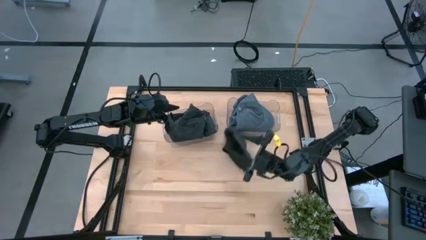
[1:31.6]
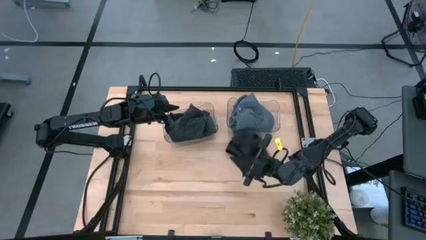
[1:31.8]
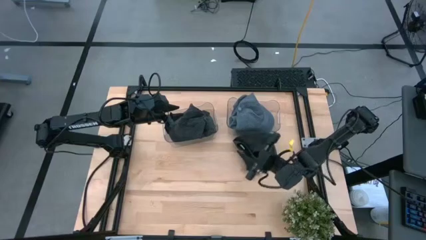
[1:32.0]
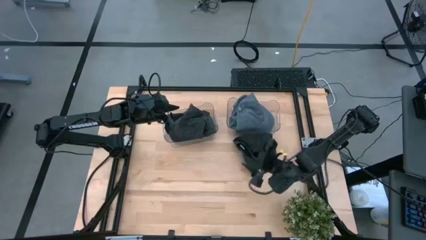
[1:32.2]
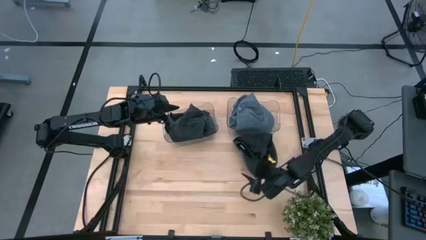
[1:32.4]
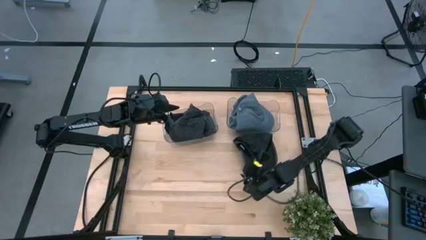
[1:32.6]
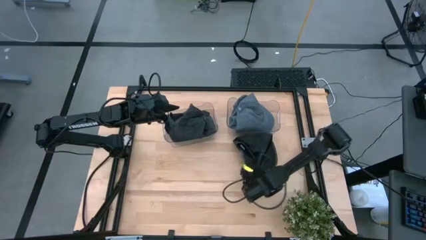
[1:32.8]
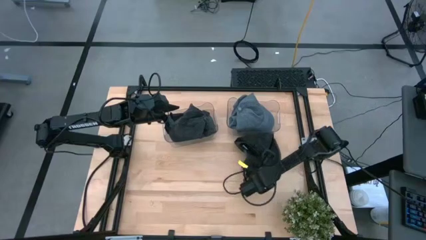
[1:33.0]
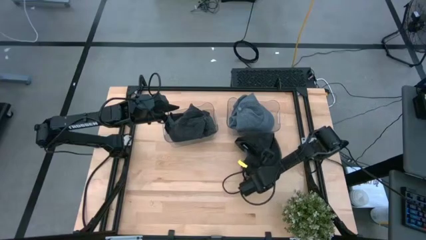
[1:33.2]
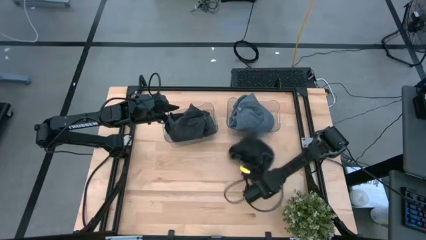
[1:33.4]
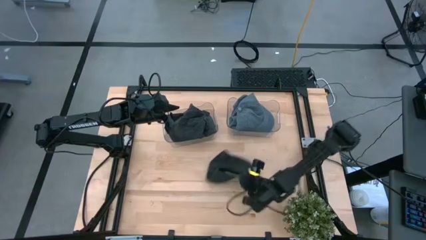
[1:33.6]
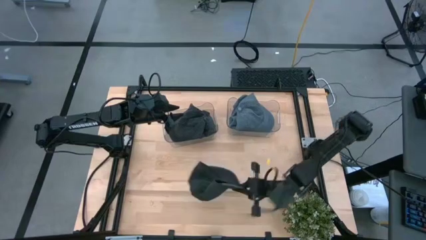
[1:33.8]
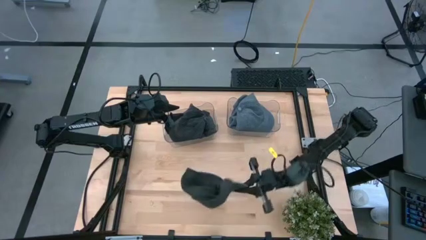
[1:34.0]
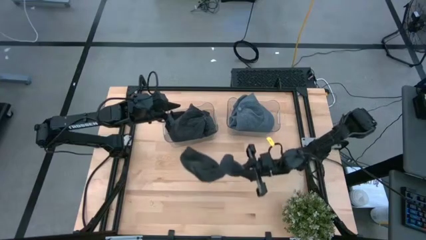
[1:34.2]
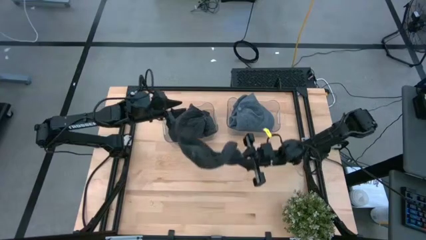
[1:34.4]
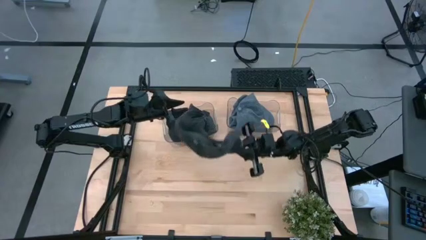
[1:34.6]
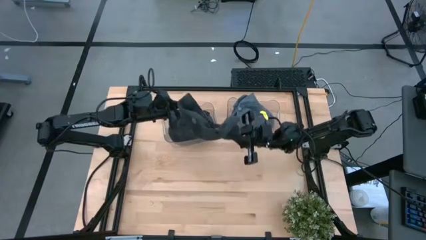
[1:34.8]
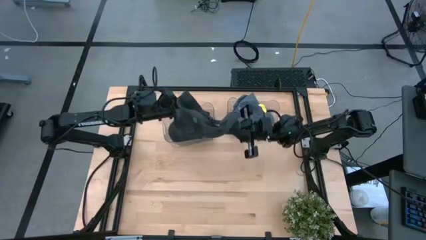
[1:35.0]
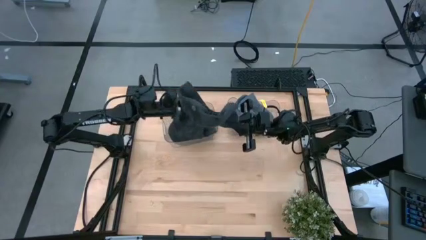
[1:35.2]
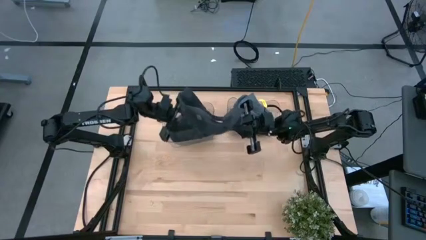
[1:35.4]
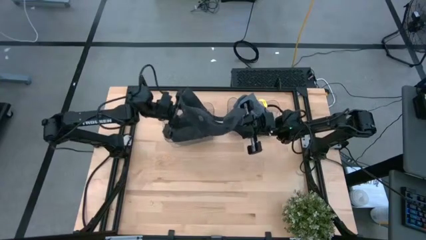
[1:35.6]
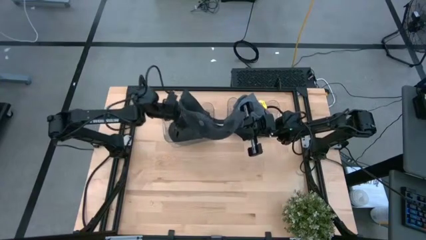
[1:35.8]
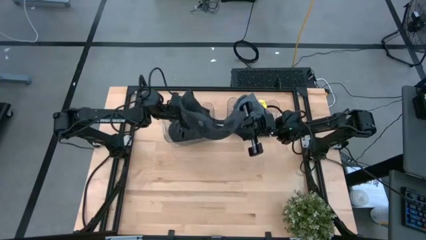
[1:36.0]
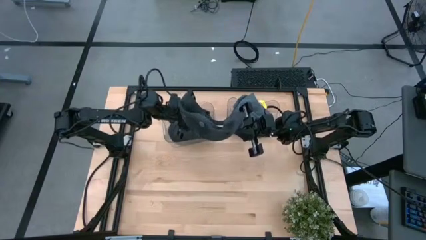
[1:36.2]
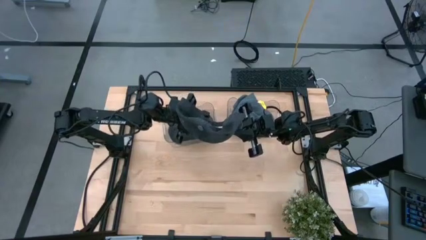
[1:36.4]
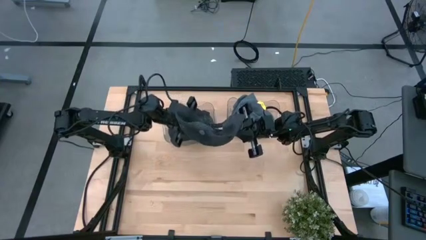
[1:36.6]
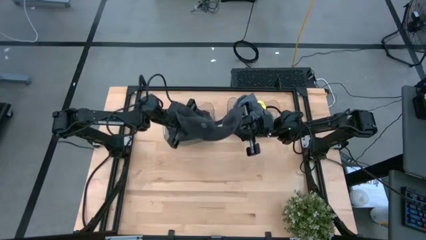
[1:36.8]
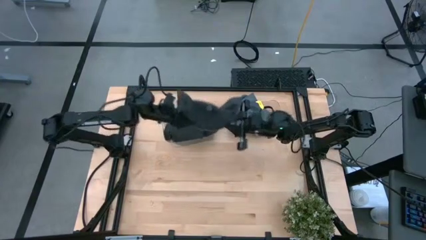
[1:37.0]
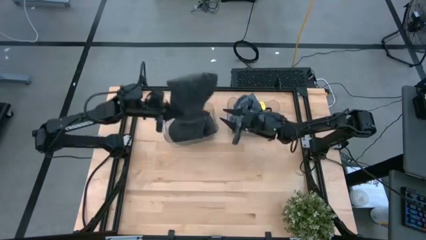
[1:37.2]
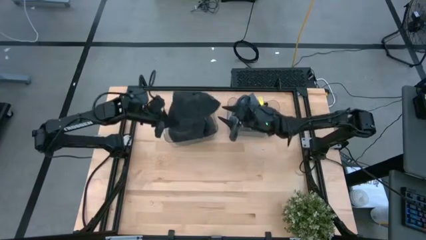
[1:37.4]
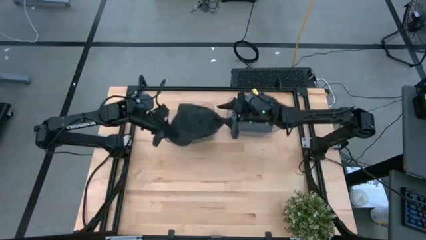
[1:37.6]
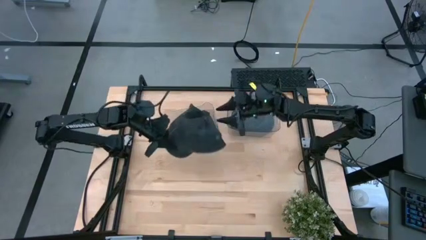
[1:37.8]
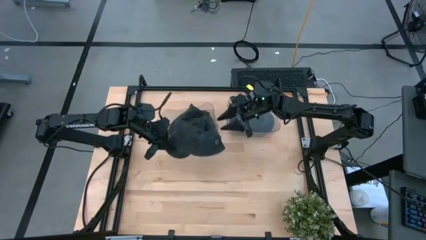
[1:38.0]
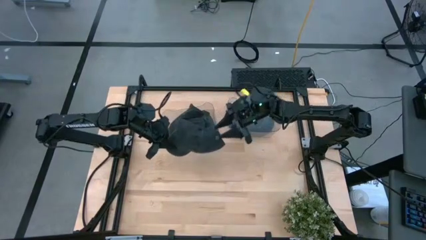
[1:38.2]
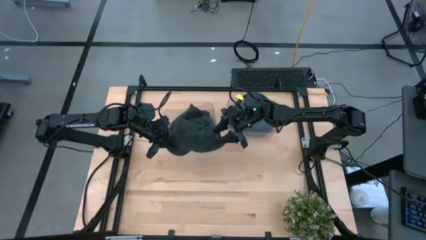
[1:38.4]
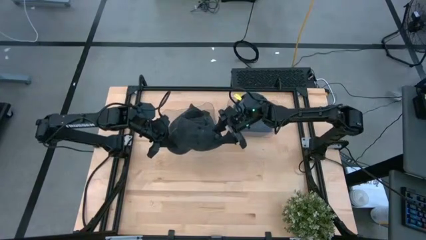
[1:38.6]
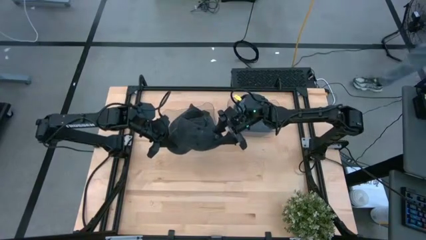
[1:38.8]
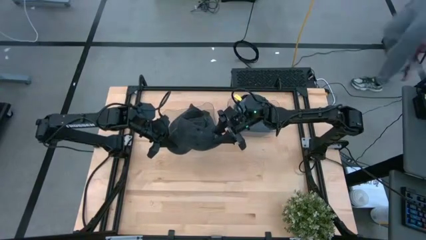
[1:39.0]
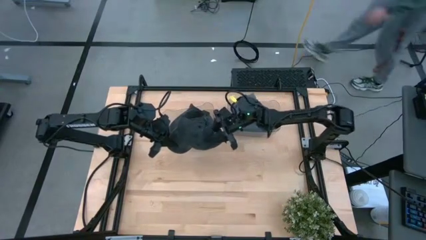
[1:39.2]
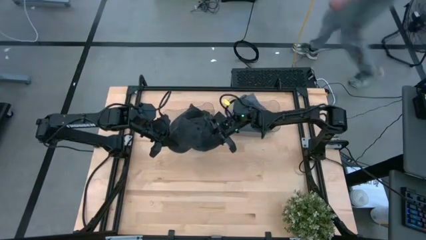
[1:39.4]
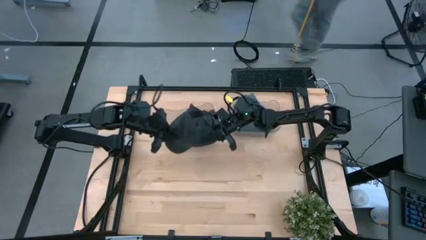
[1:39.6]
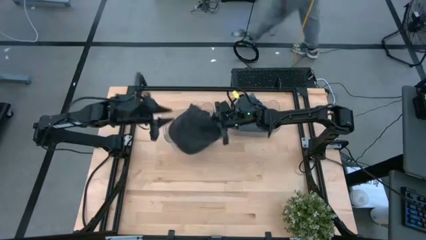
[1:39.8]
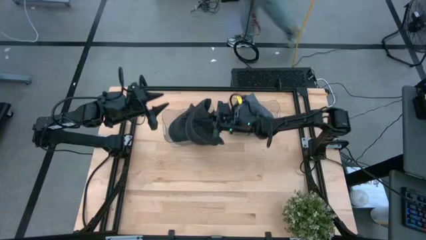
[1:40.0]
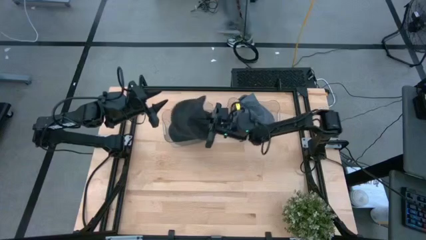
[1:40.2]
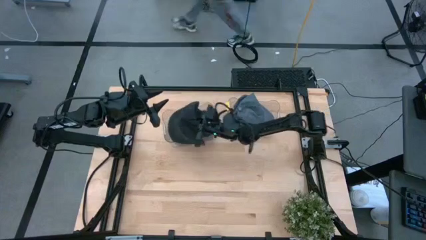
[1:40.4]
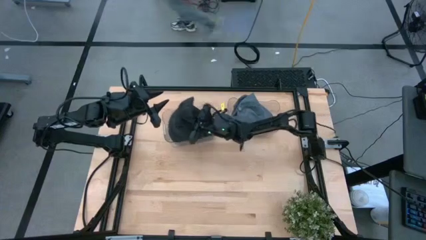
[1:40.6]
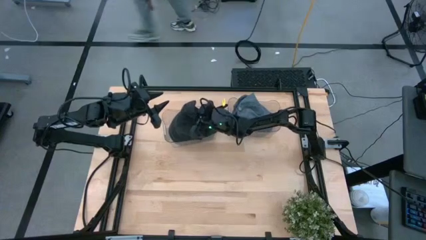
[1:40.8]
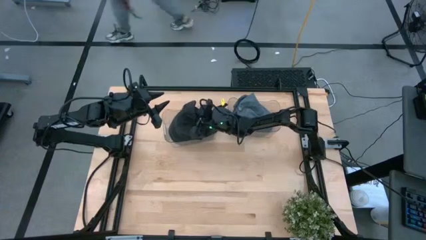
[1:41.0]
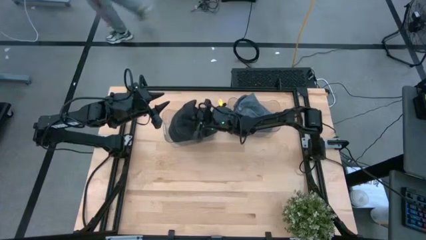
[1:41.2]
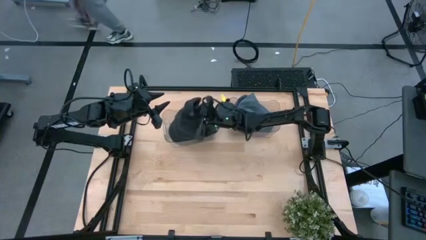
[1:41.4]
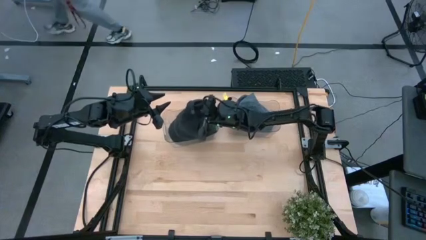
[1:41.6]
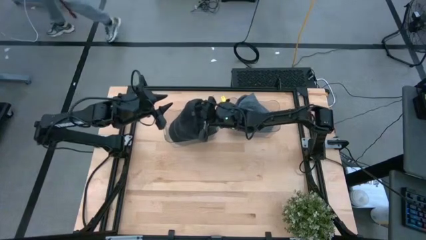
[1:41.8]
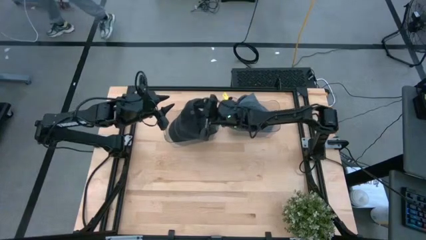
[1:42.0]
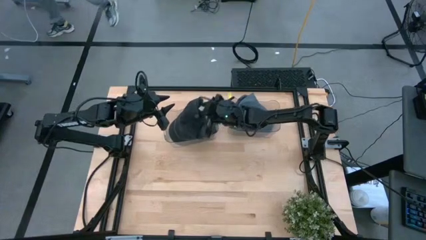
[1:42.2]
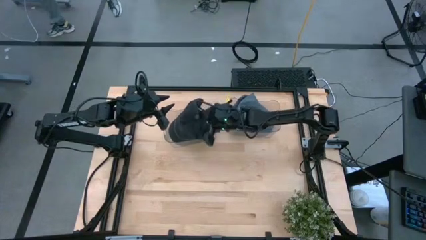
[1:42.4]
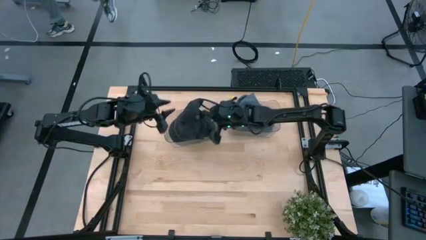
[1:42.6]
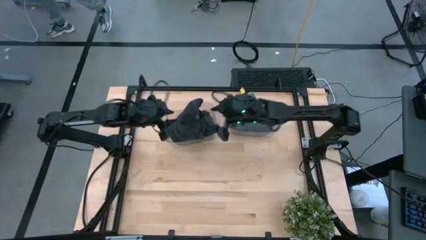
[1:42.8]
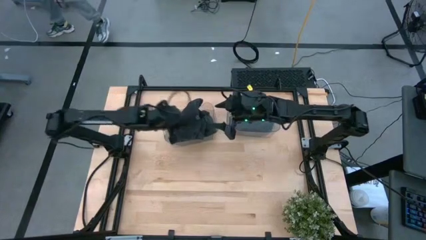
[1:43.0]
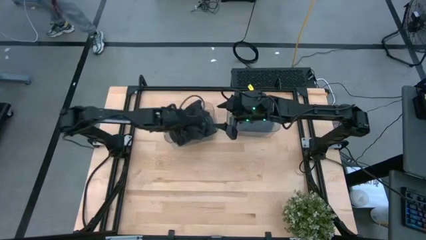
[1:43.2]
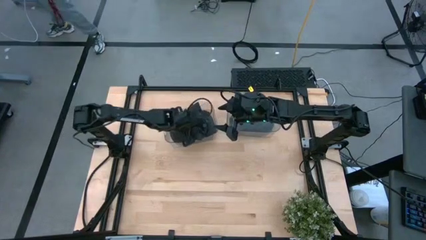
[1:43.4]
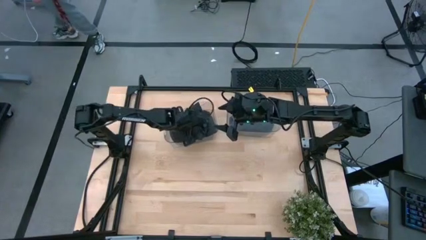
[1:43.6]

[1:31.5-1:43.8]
Task: Pick & Place hat
Put the black cap into the left transparent bin

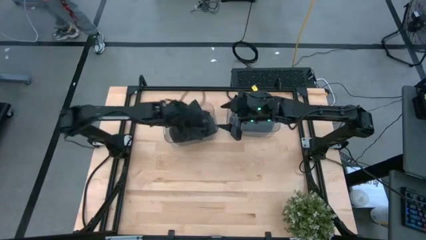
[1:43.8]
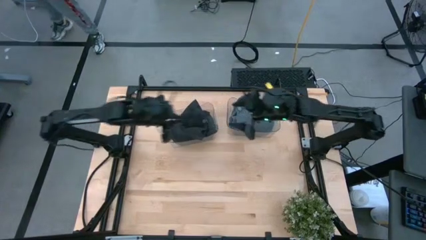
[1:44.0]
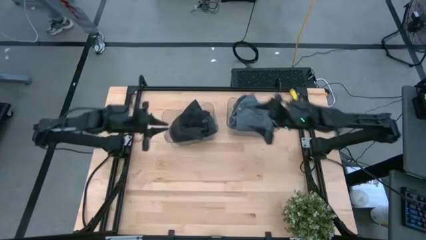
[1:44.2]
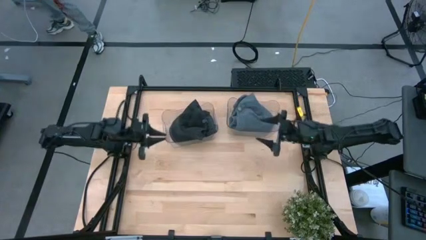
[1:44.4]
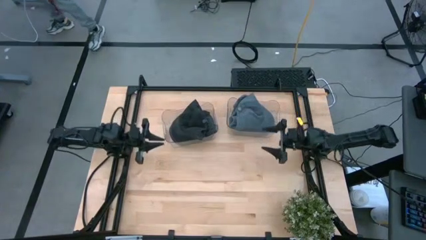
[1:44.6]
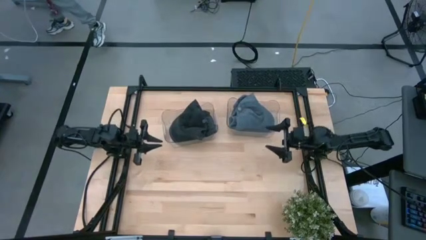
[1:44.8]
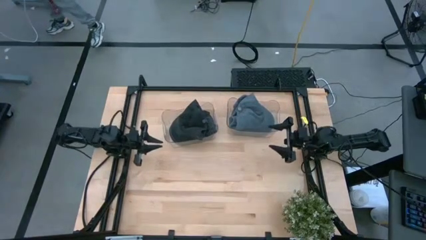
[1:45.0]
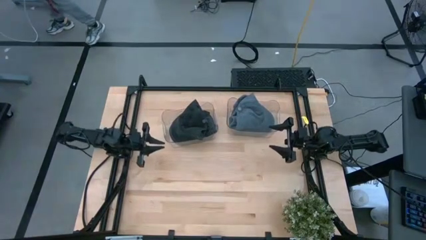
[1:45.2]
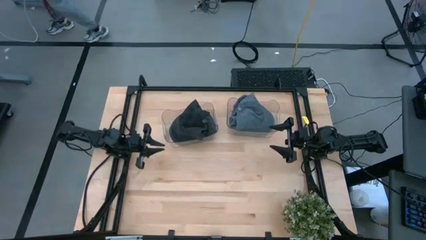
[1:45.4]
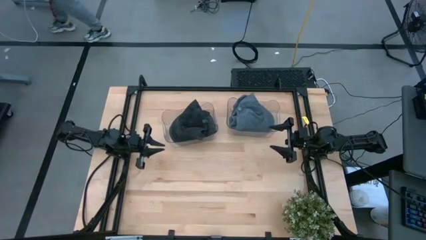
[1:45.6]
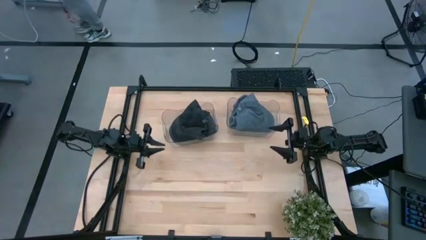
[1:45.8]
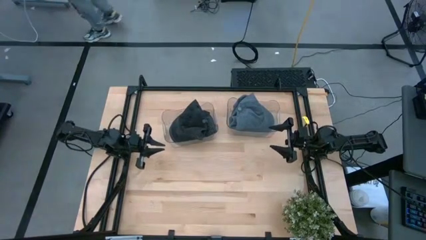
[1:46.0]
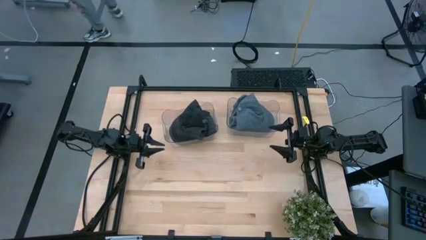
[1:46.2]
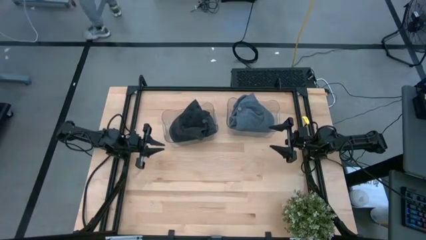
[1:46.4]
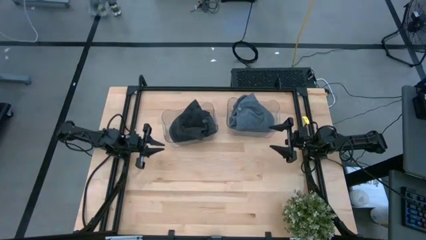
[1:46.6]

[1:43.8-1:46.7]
Return to Home Position
